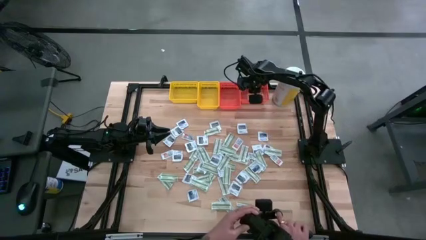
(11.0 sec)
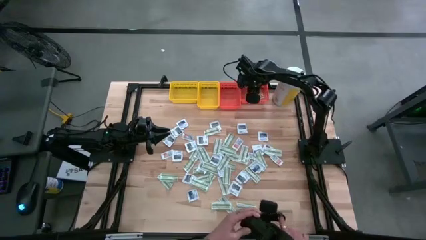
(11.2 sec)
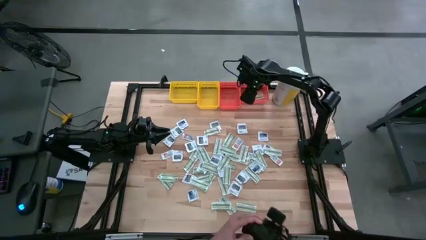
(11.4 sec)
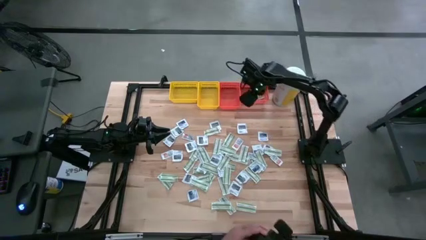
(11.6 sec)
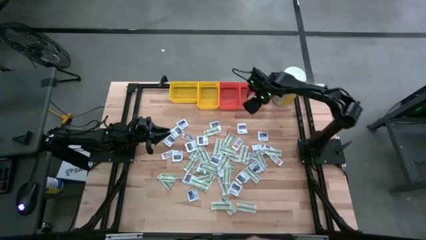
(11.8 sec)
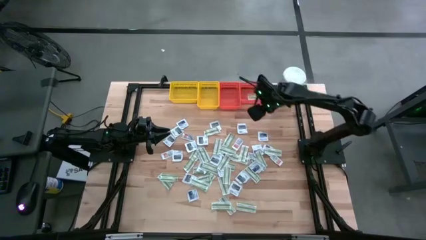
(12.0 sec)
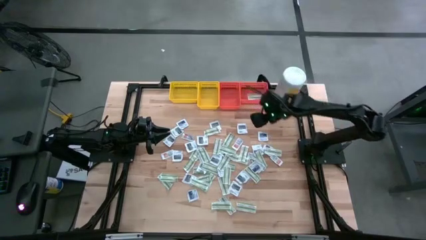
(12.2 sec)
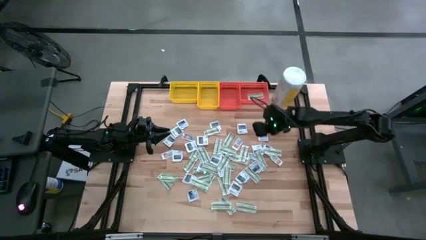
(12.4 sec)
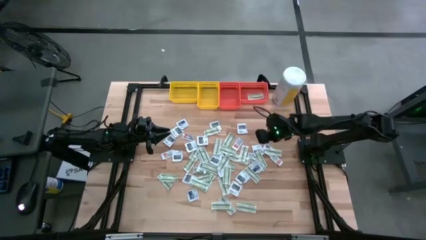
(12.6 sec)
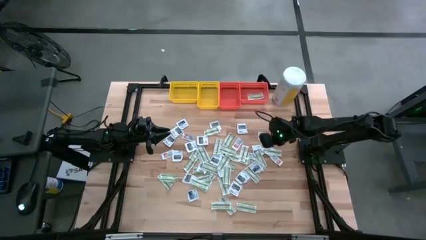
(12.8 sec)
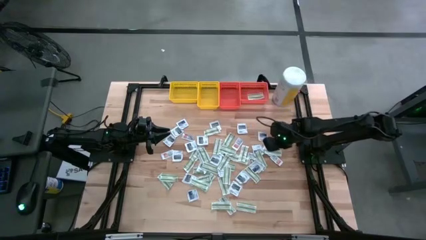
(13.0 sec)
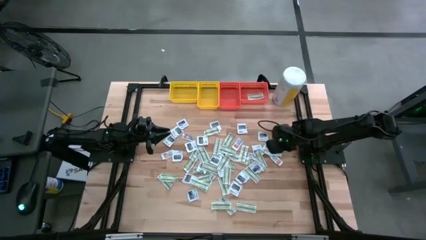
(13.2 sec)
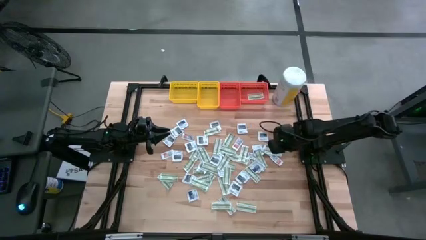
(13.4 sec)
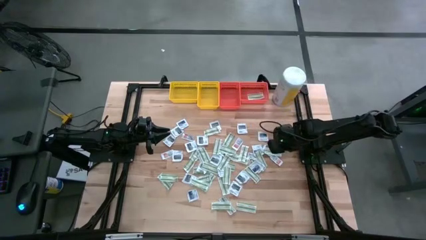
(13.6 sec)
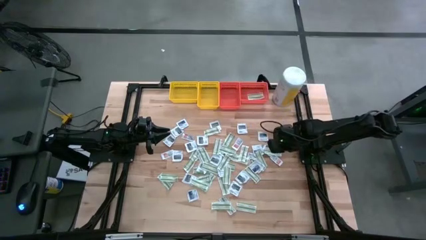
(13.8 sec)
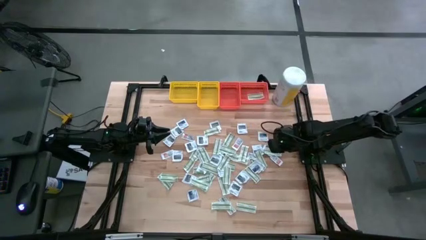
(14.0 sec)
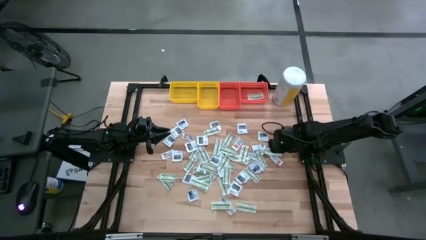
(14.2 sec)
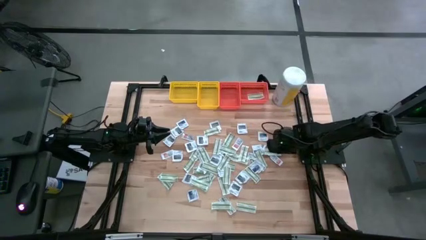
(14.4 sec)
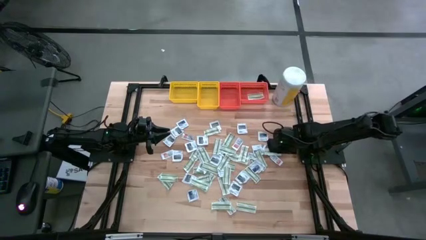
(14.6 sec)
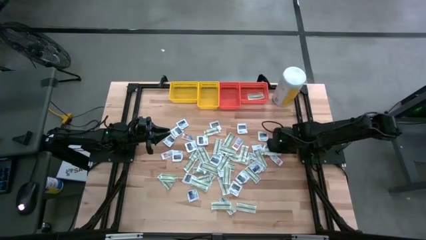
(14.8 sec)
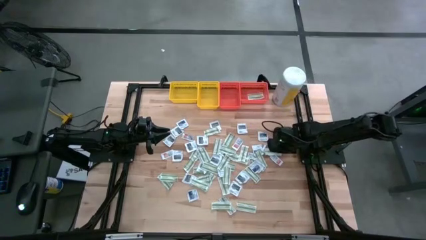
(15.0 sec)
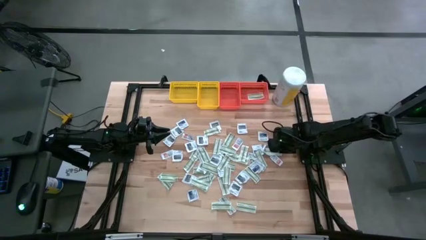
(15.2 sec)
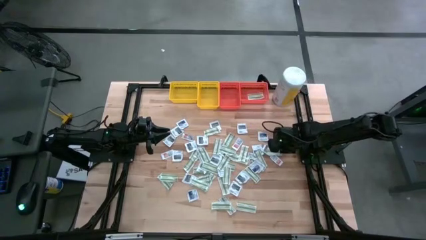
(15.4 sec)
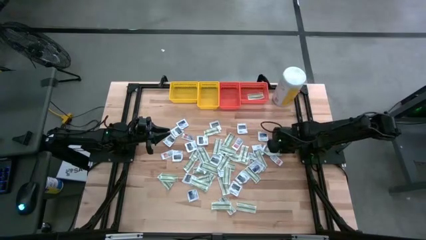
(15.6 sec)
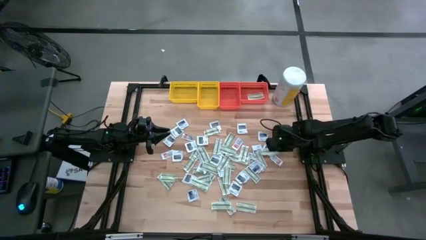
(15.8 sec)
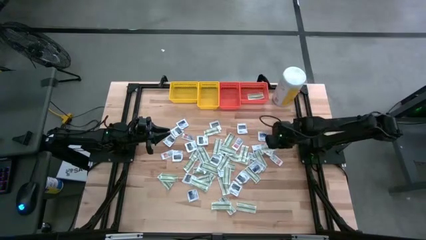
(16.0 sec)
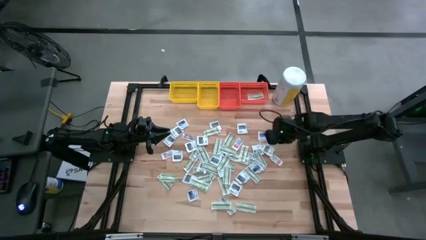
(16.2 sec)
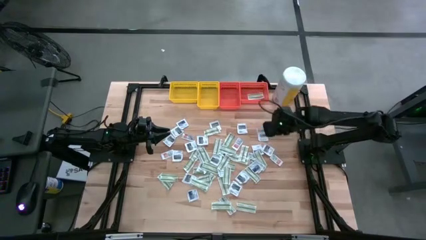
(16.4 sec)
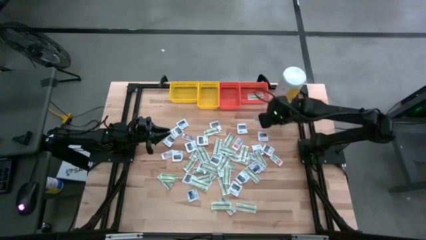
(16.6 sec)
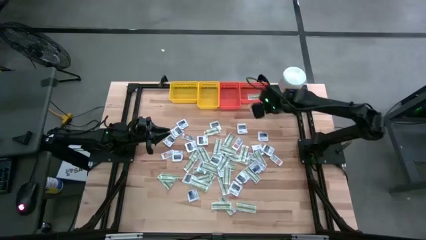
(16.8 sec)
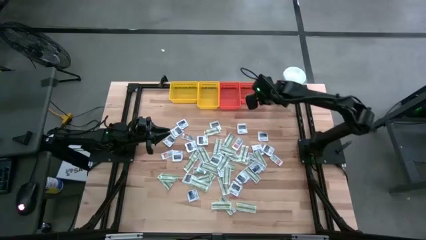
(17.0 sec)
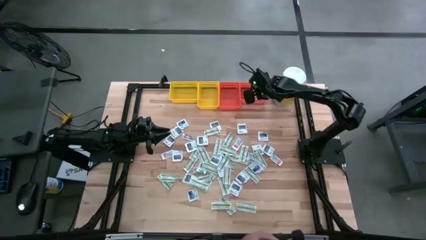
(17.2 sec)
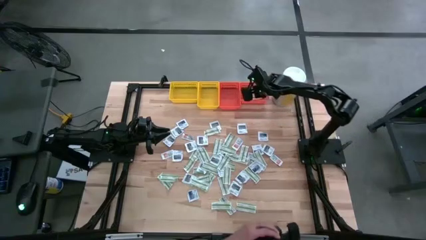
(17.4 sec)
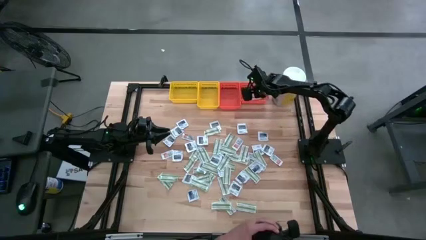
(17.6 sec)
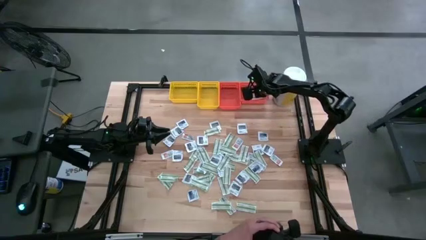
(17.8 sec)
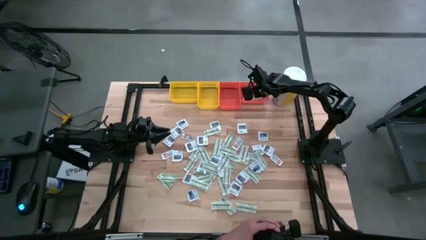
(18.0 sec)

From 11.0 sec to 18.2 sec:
Task: Pick & Place First Aid Supplies
Put the green pad into the right orange bin

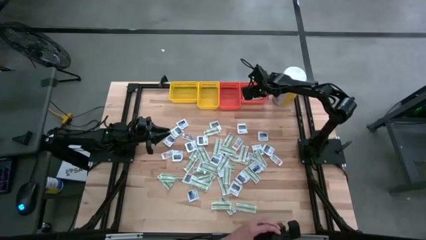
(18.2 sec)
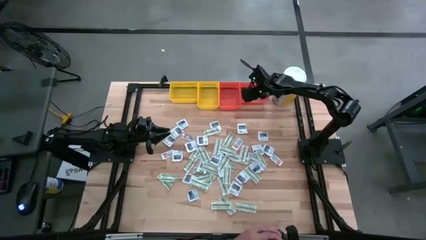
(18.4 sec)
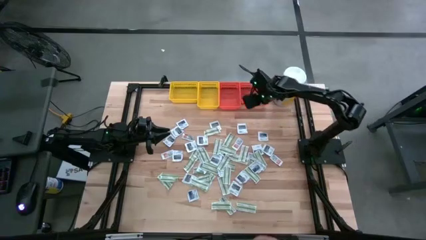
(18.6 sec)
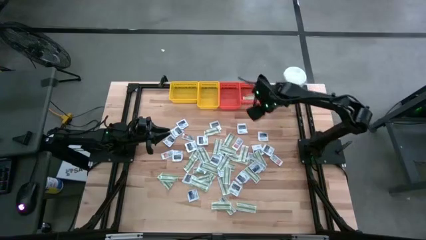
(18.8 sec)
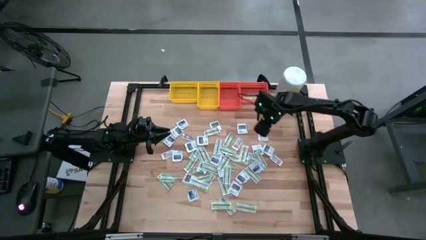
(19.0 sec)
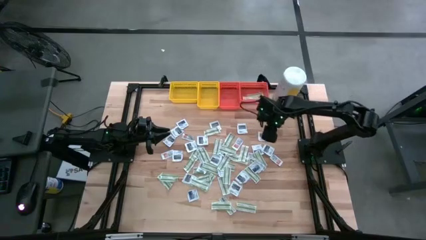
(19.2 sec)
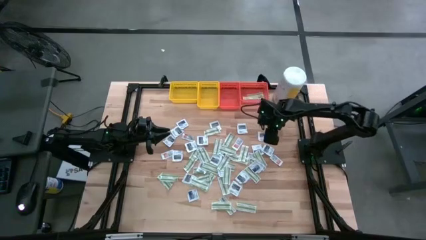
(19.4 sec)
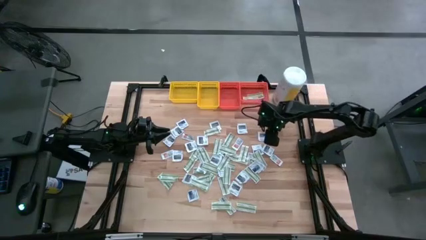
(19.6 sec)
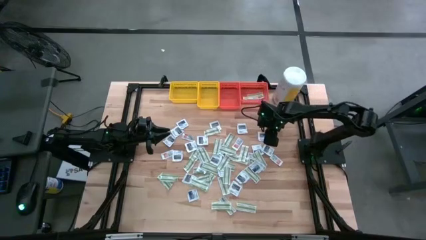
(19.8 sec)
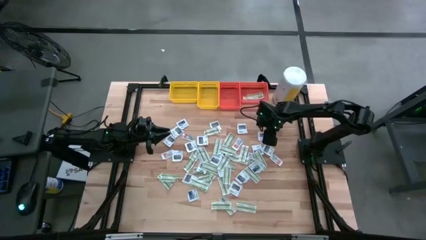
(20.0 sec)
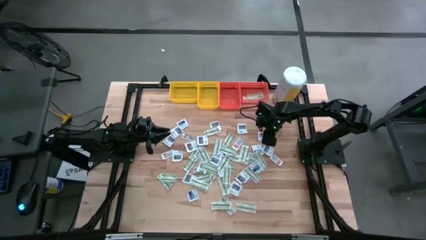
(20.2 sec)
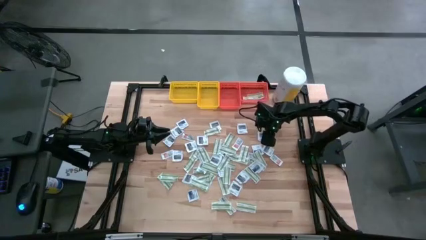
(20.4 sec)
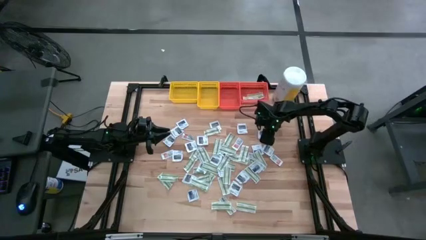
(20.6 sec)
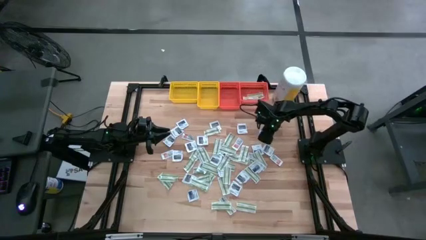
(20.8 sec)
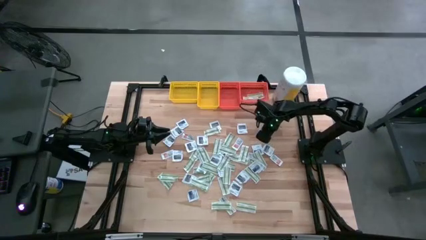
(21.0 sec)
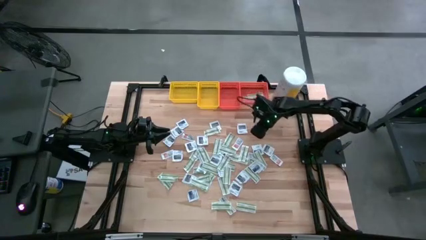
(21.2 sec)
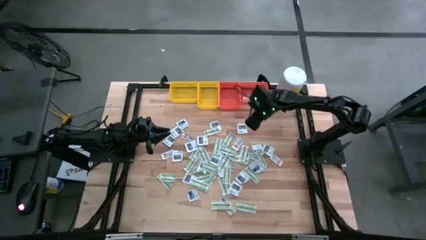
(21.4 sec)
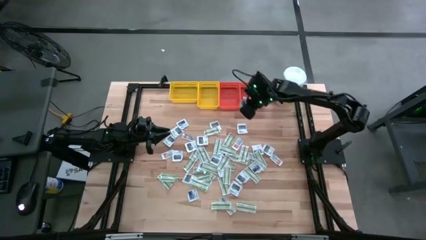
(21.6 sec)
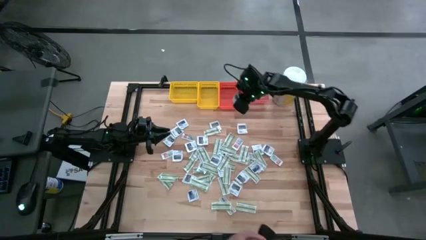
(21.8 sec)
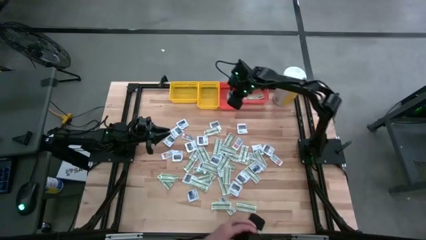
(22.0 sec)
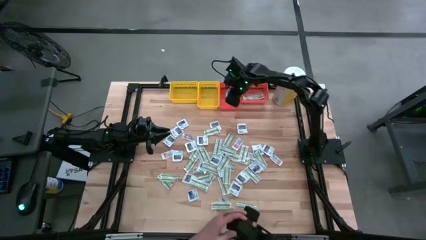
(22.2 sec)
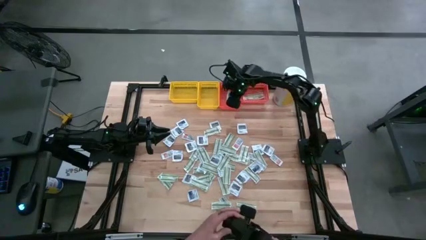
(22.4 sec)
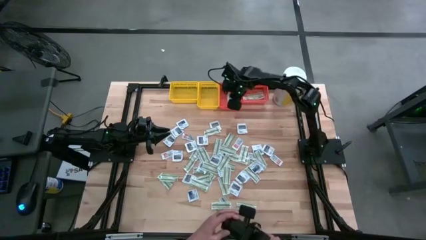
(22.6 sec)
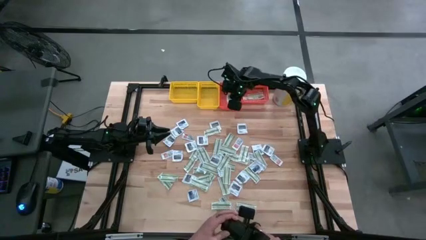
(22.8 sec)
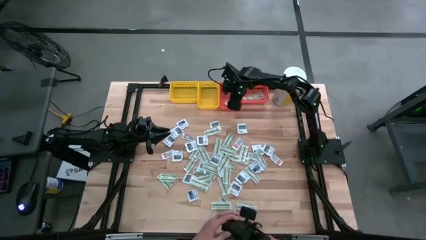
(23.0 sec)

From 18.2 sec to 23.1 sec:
Put the blue pad into the left orange bin

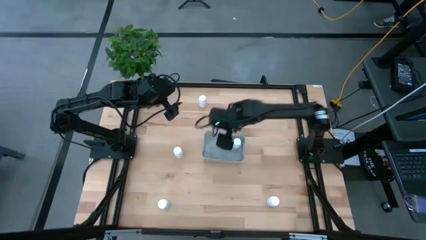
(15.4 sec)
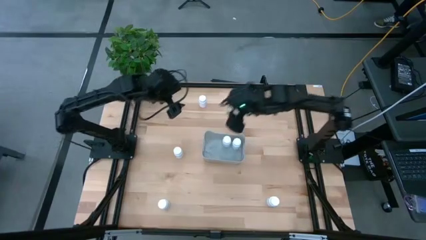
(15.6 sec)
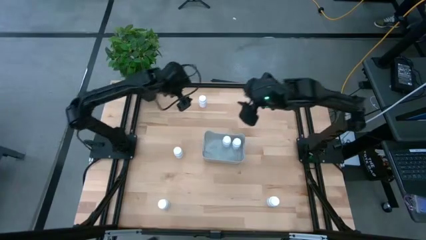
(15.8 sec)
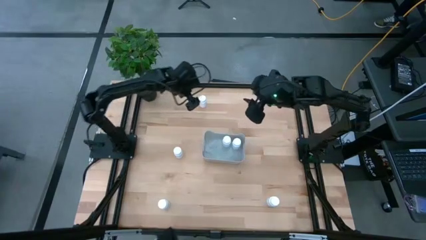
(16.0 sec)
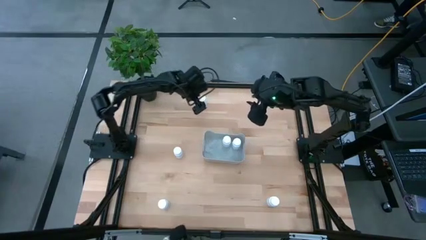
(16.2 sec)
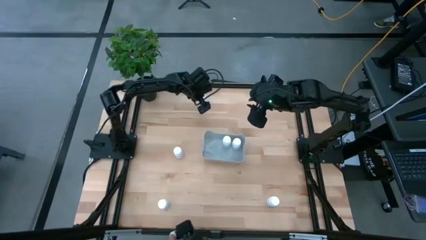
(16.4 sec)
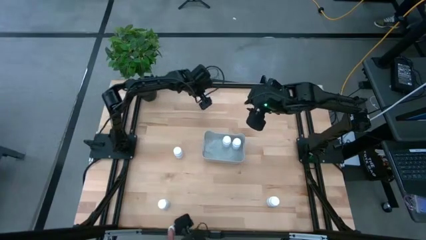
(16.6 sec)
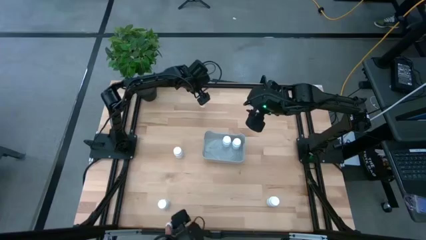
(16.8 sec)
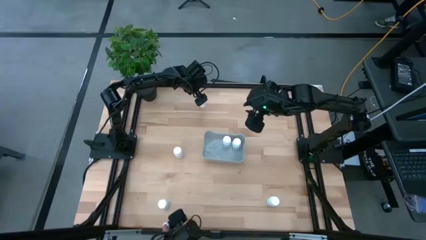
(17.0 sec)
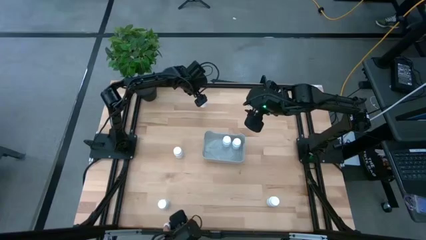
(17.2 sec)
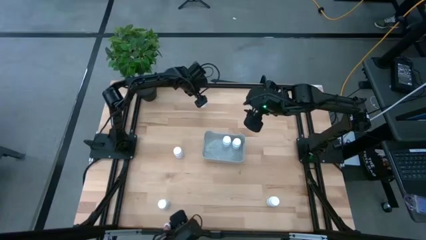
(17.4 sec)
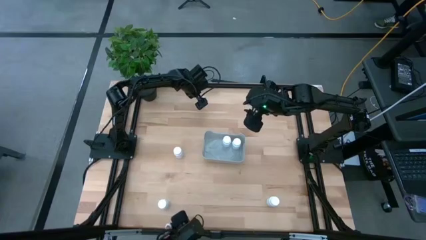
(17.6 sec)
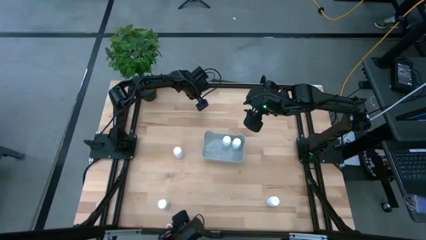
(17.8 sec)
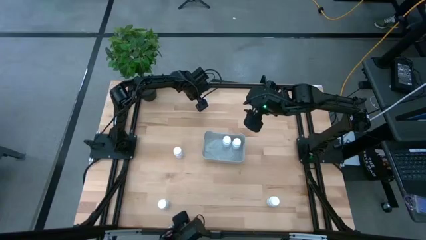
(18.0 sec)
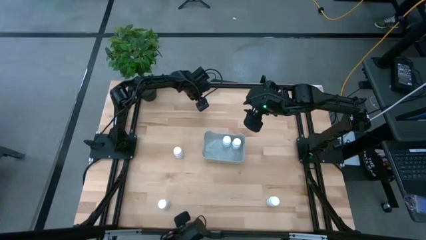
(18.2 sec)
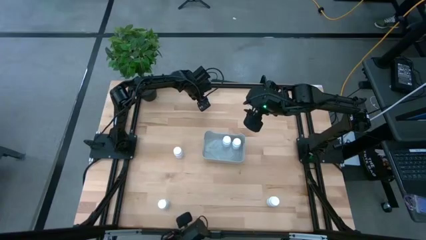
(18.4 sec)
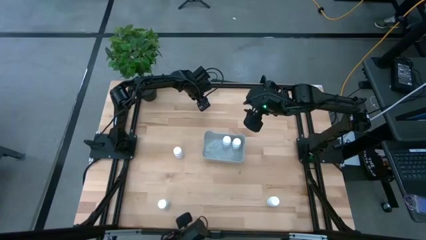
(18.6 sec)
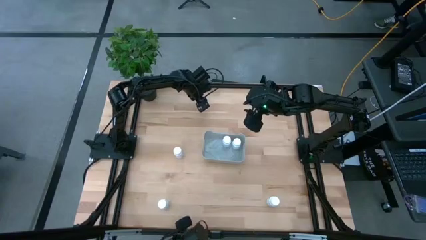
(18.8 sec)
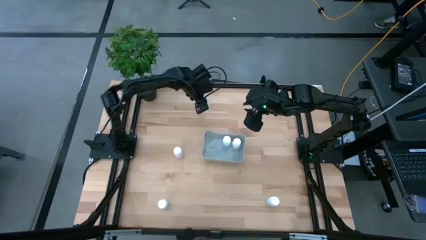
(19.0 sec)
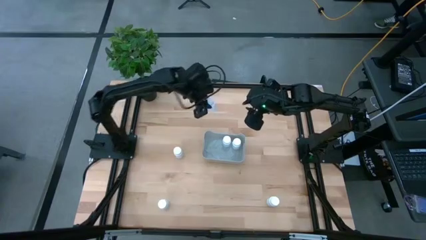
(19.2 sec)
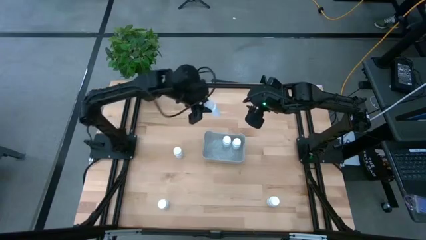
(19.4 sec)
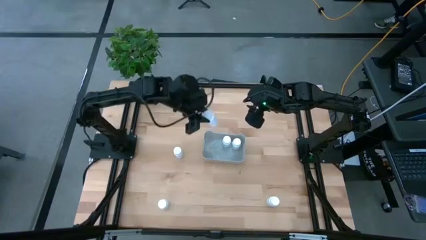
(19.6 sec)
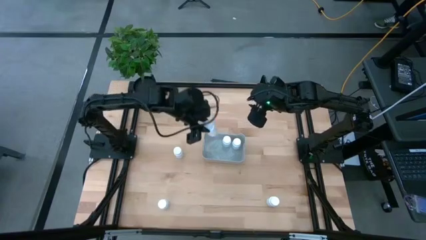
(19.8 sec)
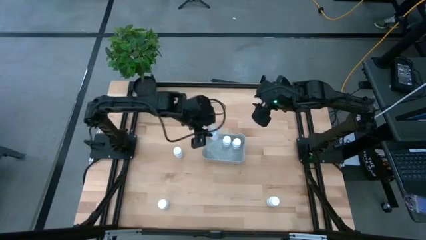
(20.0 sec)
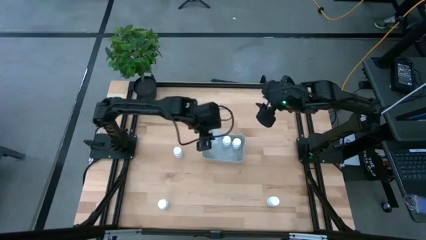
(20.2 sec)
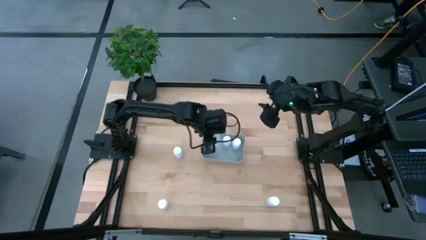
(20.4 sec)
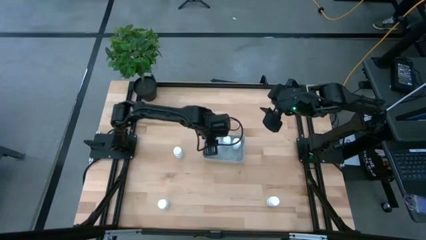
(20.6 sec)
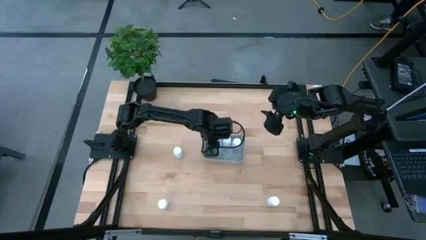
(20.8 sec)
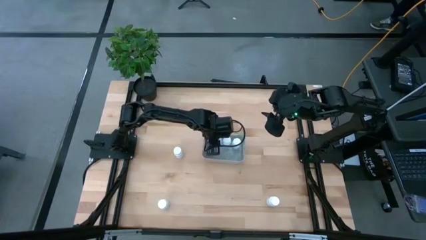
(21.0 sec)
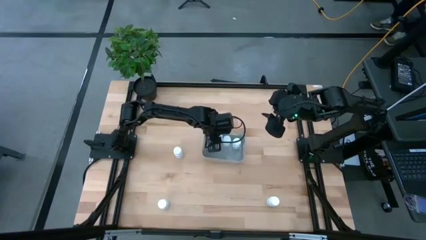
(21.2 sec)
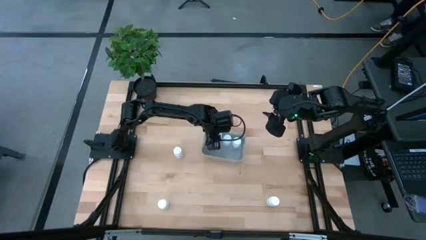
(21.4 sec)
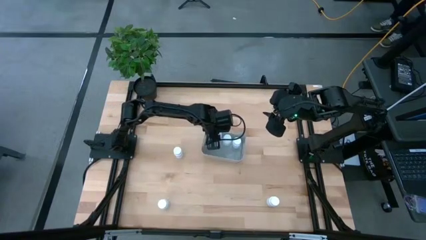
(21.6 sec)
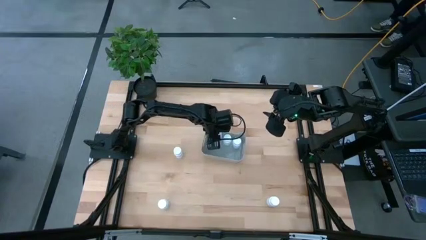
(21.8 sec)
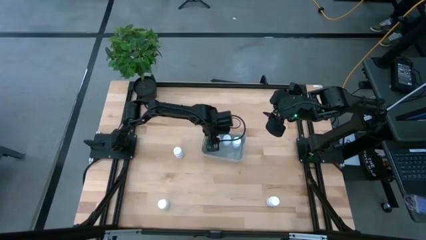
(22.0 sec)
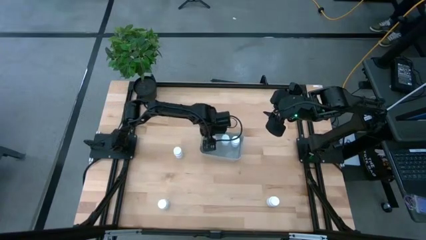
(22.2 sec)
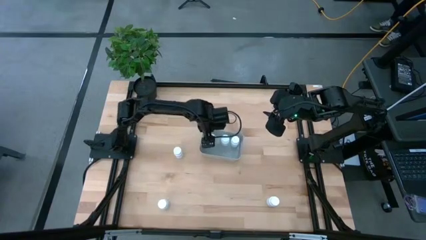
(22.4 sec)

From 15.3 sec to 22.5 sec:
Task: Pick and place pill bottles into a basket
Put the white pill bottle into the gray bin
